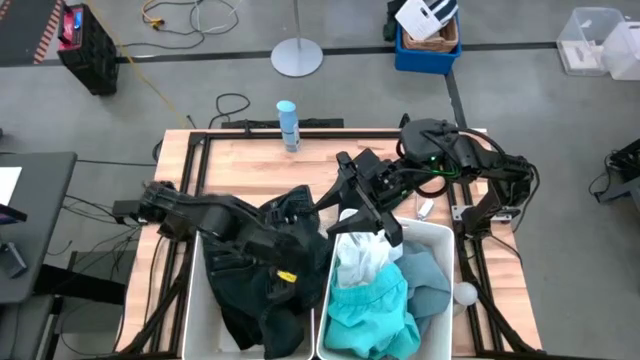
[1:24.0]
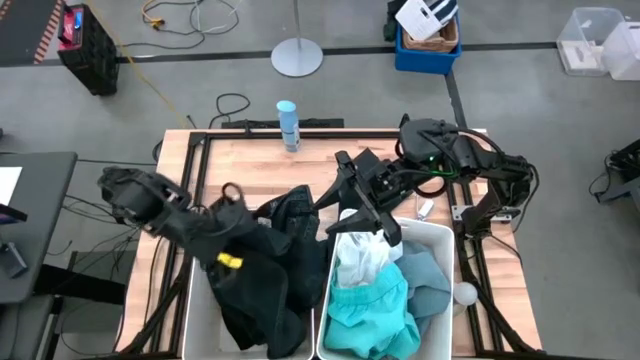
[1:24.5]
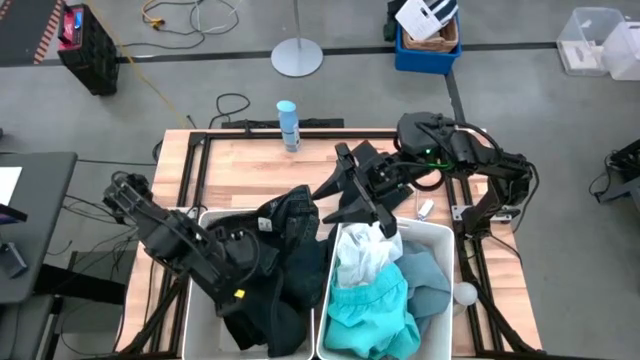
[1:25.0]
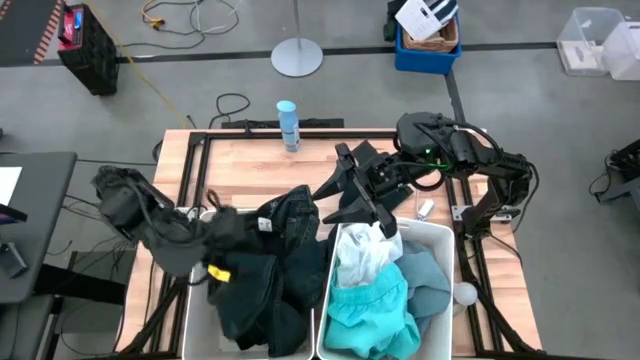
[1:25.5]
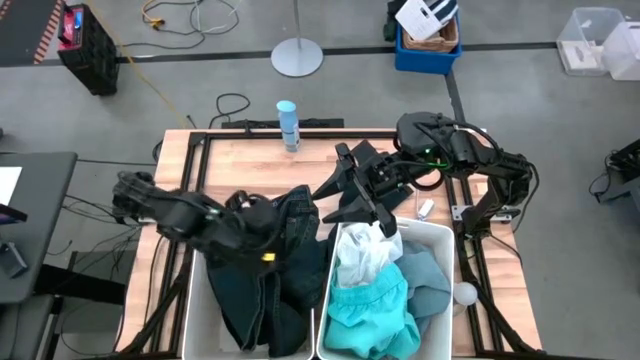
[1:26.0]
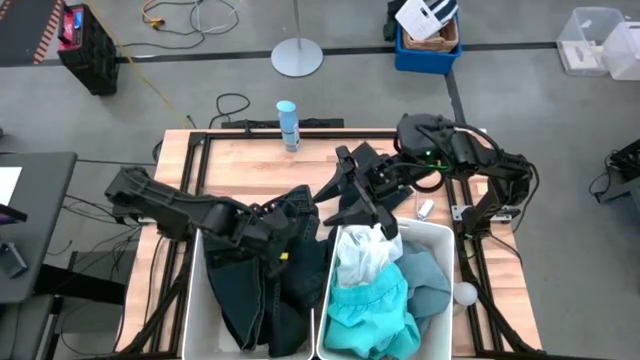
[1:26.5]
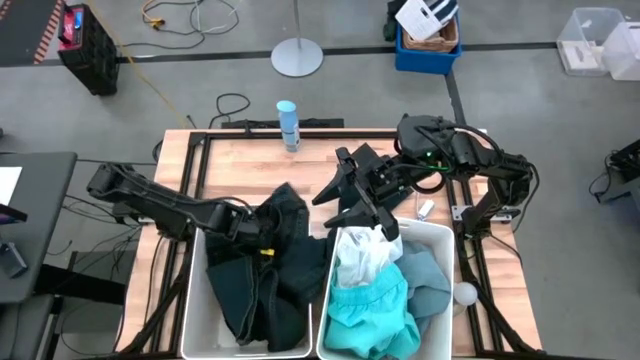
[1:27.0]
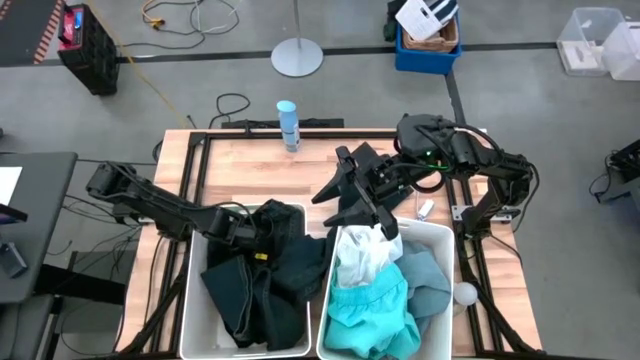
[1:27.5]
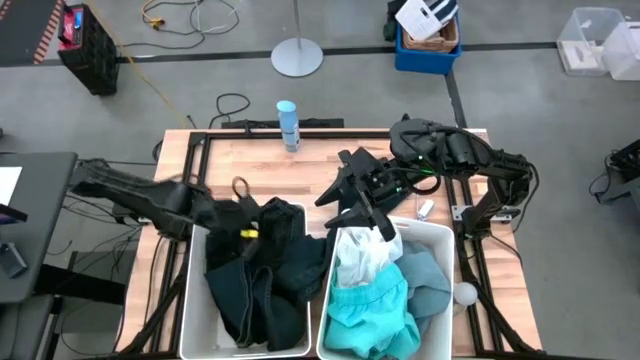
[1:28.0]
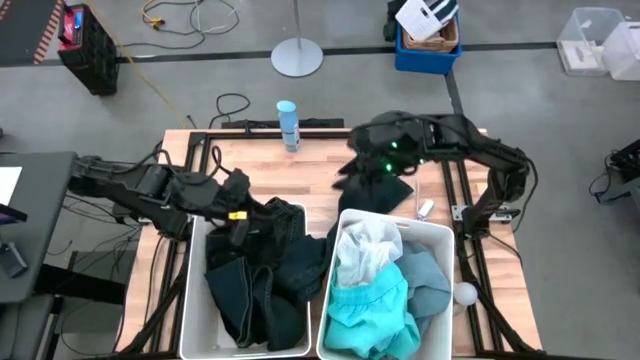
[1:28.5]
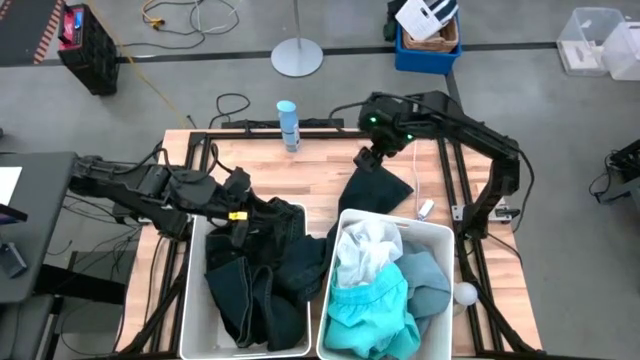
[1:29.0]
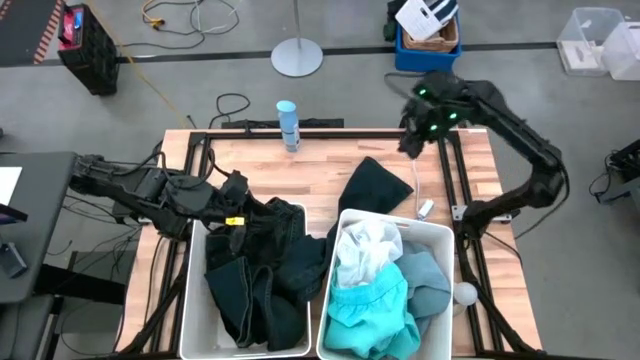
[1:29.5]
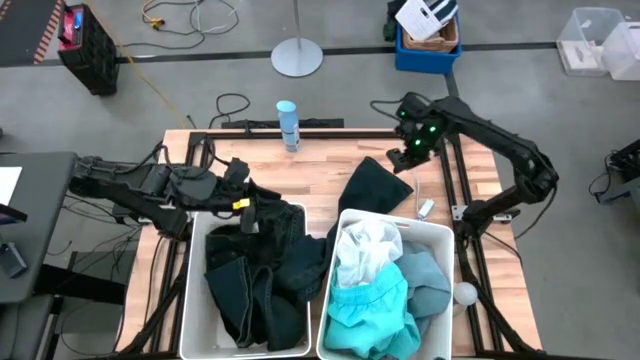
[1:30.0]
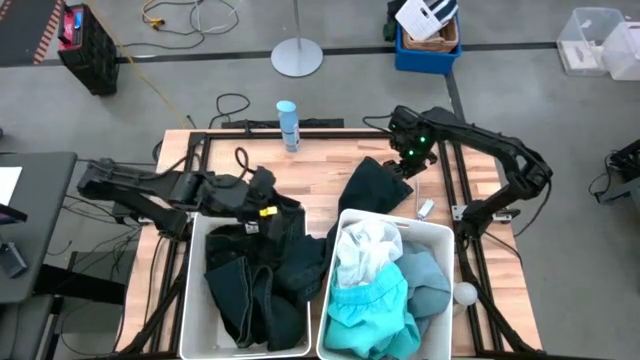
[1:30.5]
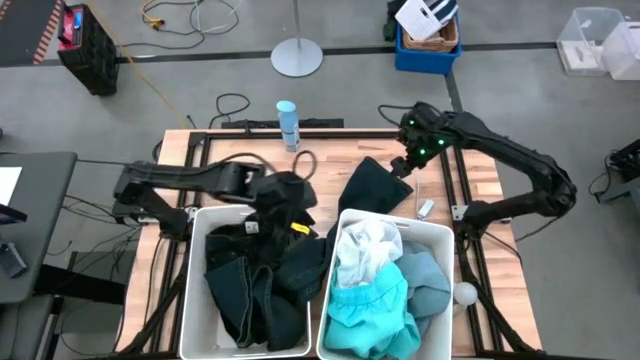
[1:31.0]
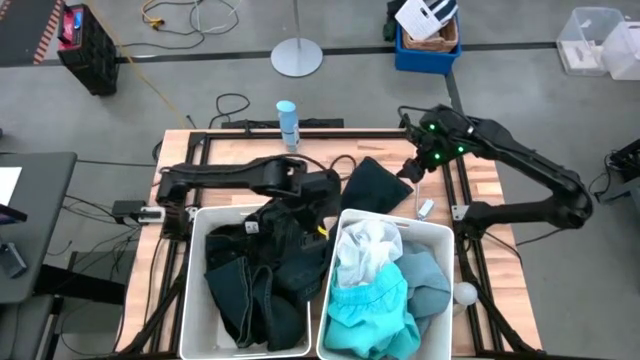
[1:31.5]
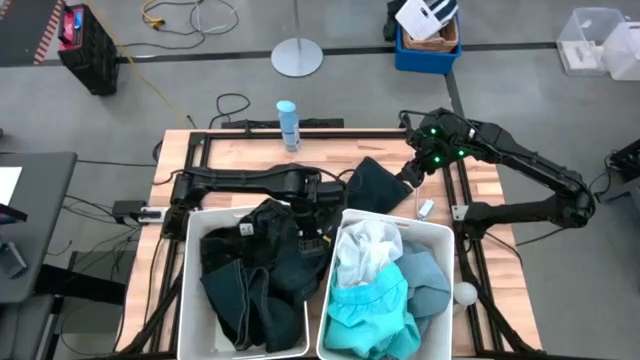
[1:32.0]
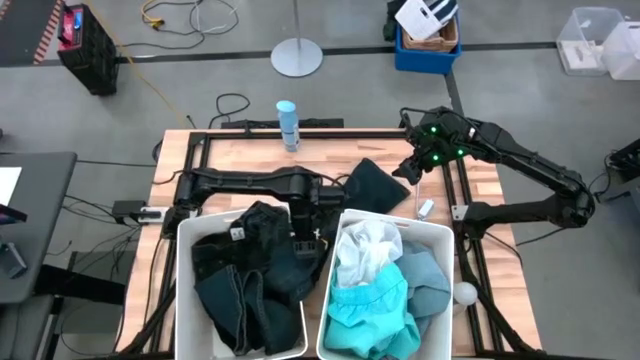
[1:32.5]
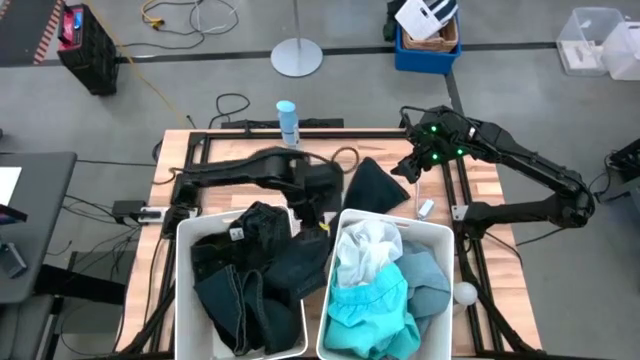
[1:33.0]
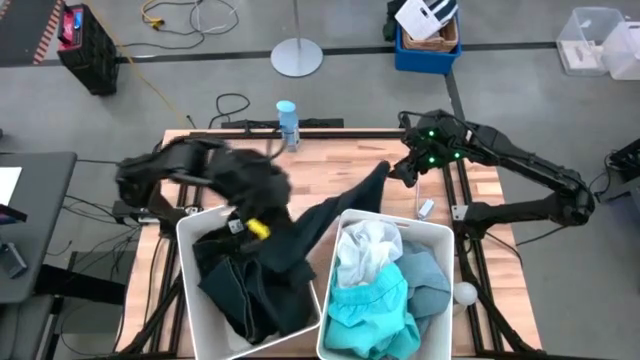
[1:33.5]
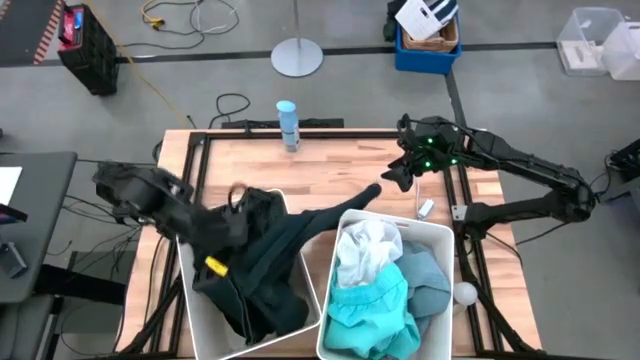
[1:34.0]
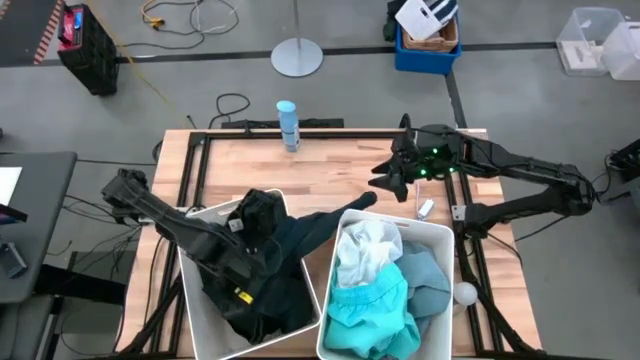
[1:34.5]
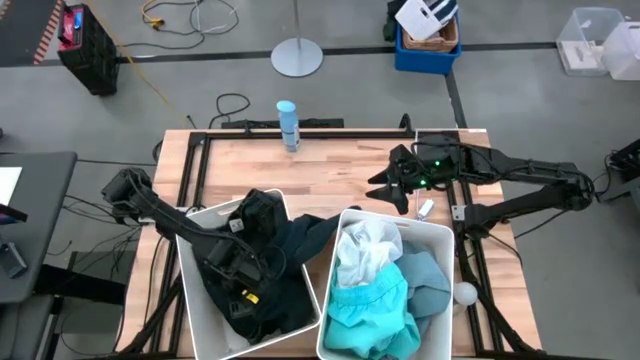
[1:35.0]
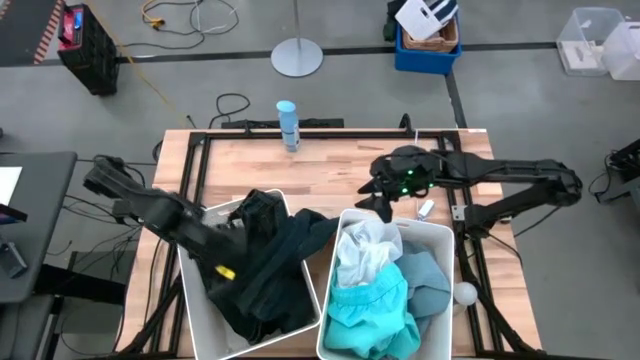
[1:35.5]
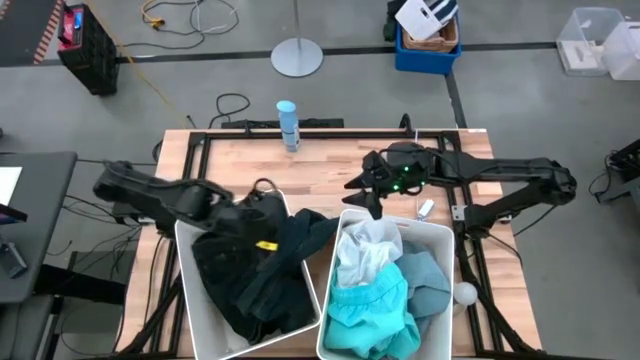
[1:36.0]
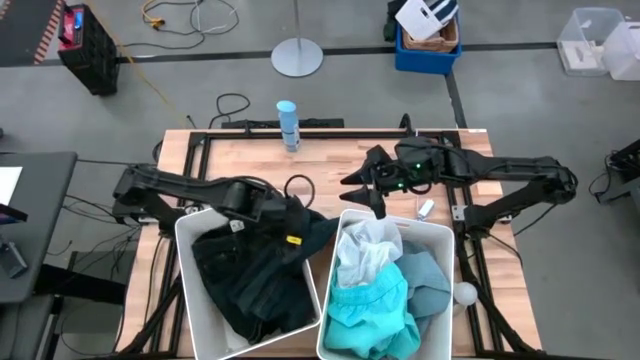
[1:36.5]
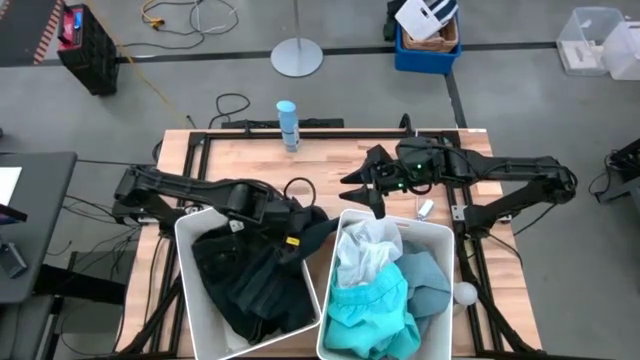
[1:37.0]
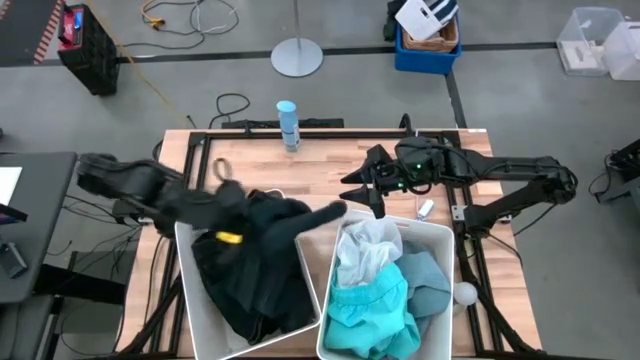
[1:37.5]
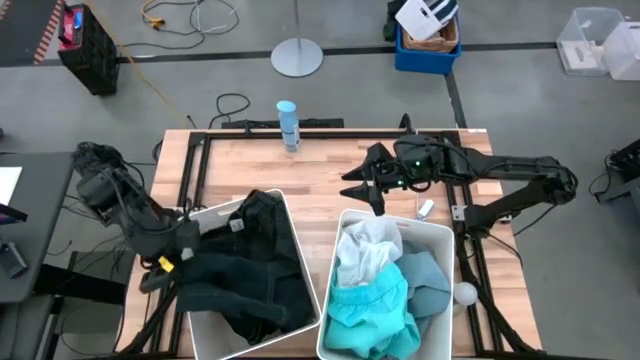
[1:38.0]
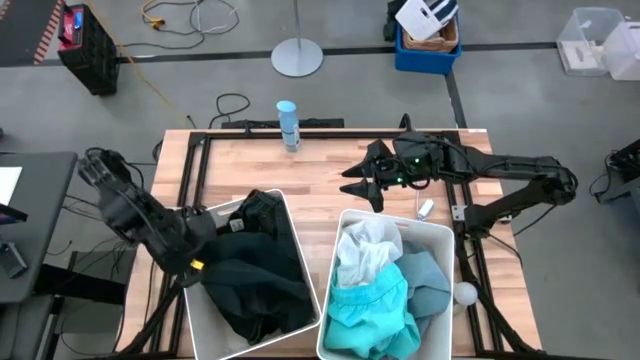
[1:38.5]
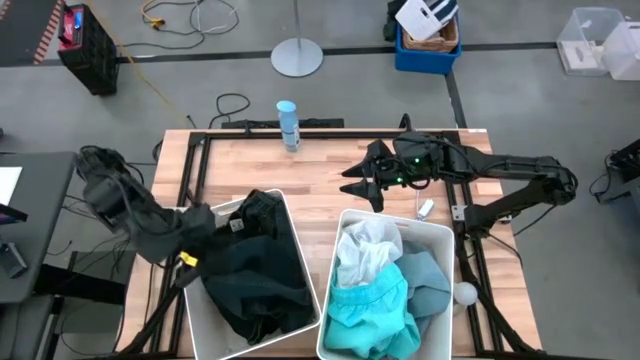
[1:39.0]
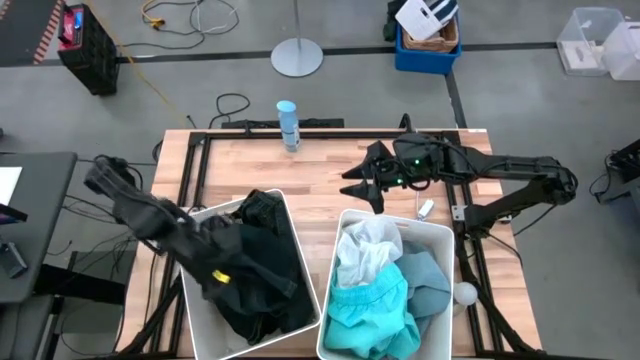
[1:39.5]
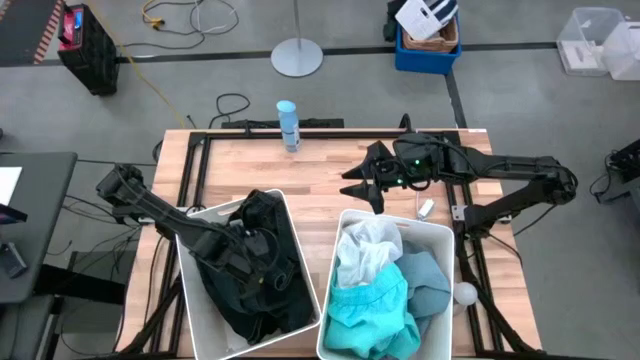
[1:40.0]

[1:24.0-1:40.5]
Task: Sort clothes
Put the dark blue pants into the left white bin

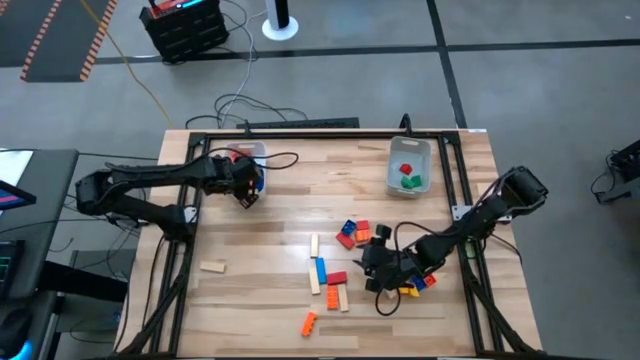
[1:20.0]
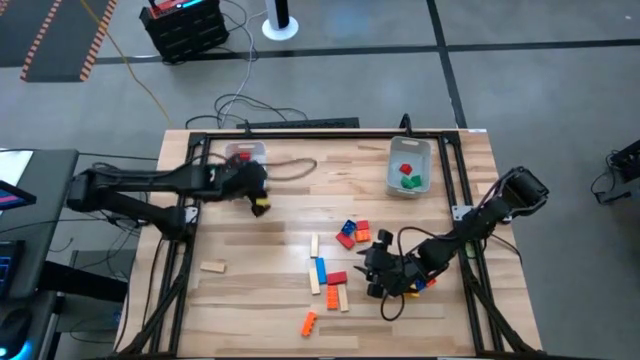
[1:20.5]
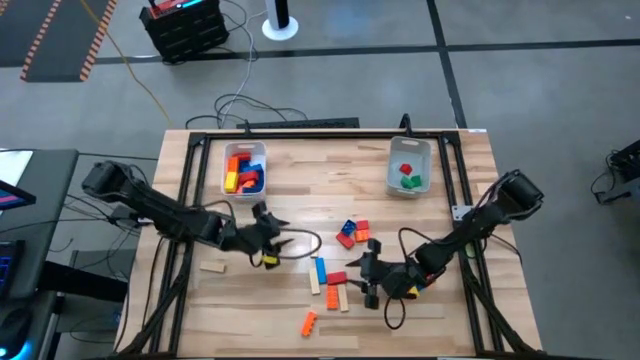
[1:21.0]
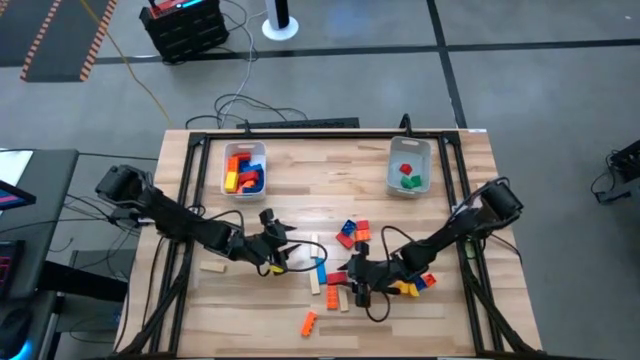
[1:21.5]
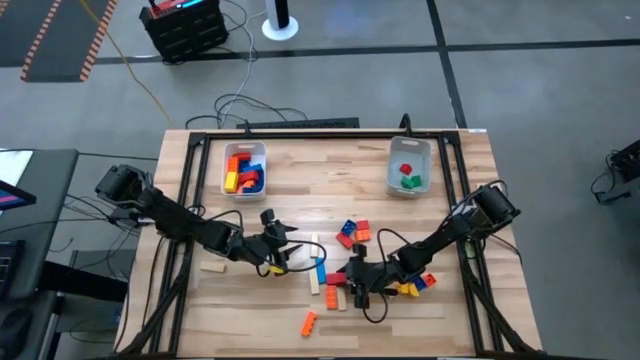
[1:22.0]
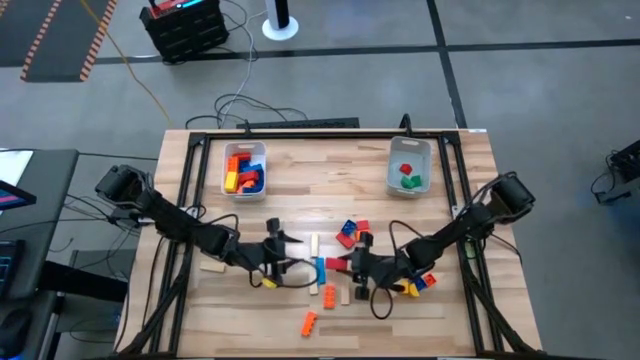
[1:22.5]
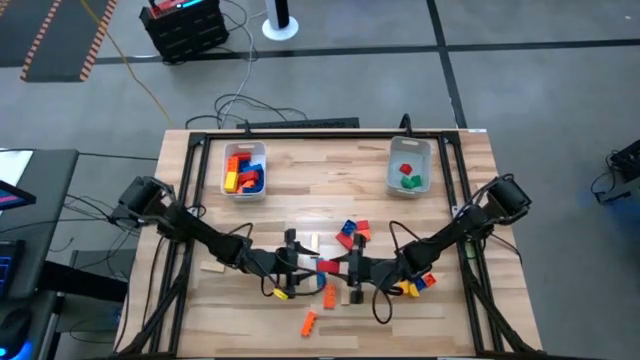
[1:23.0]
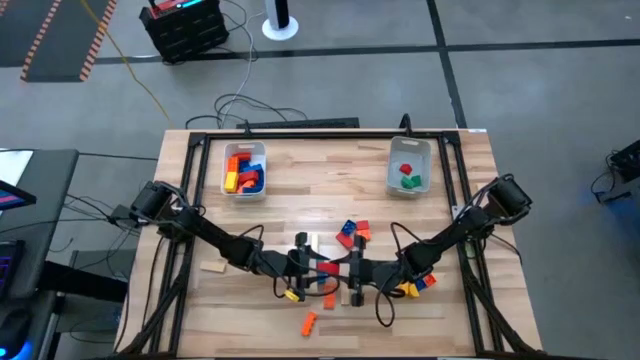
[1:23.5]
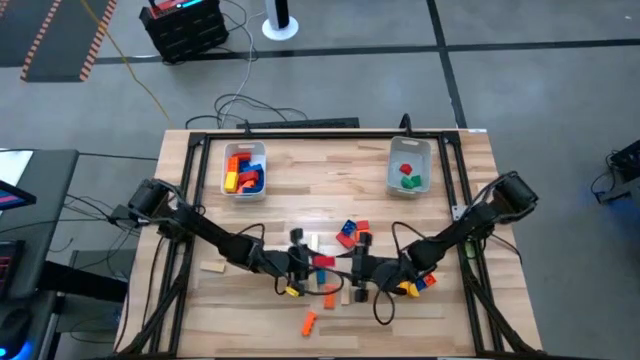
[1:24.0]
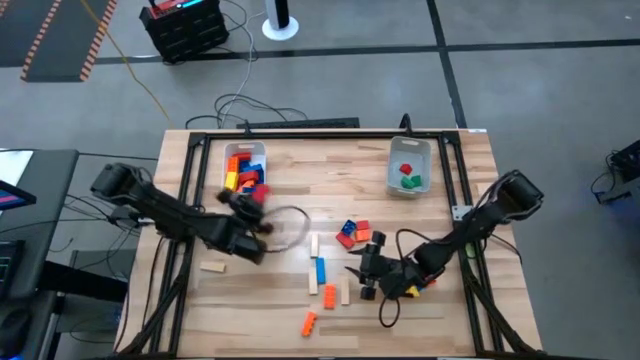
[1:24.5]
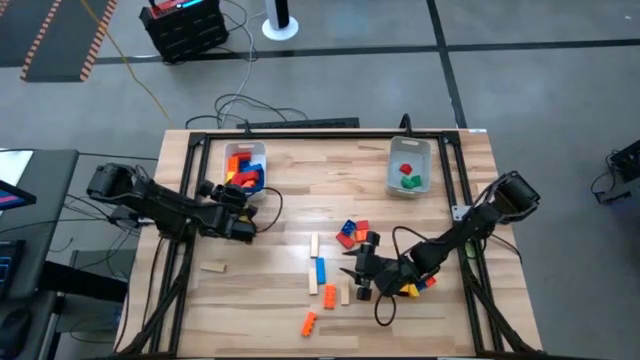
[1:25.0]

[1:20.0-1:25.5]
Task: Sort blocks by size
Put the large red block into the white bin
